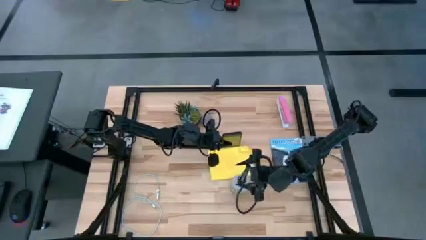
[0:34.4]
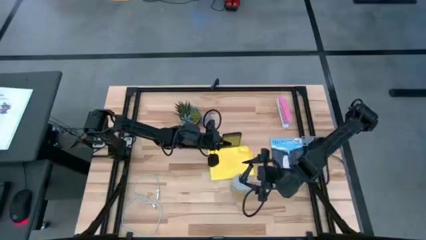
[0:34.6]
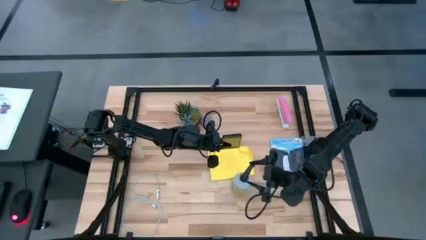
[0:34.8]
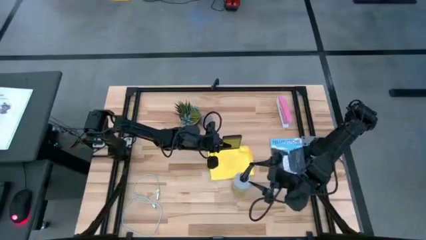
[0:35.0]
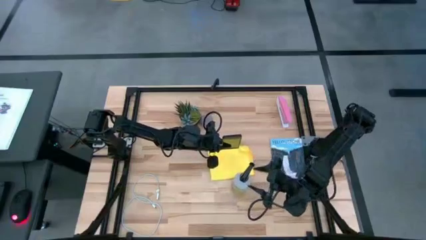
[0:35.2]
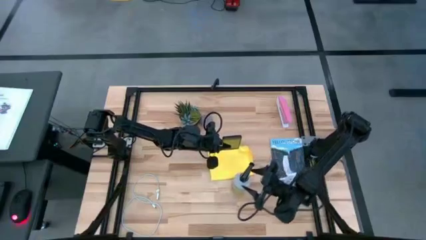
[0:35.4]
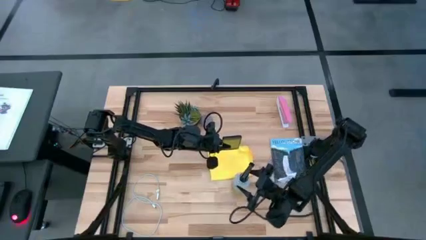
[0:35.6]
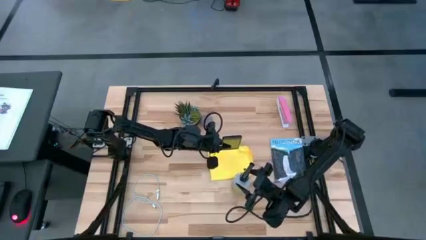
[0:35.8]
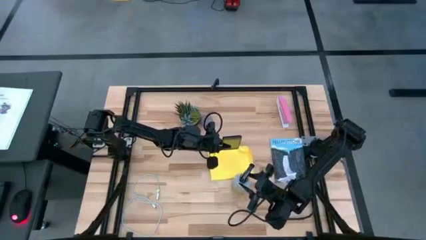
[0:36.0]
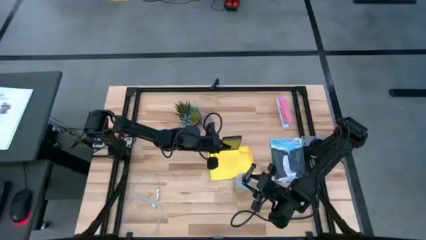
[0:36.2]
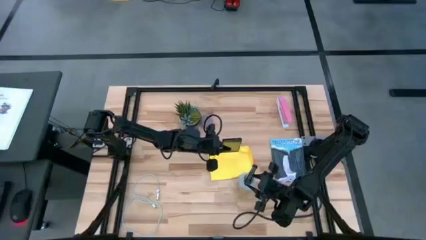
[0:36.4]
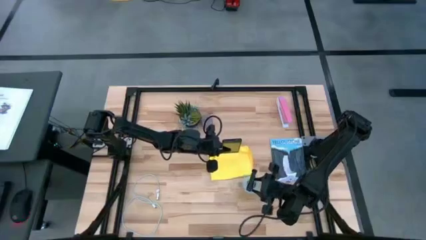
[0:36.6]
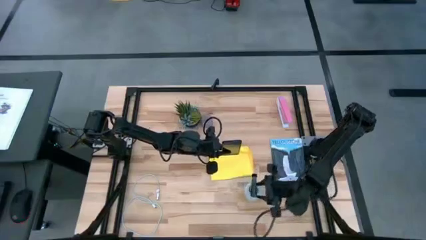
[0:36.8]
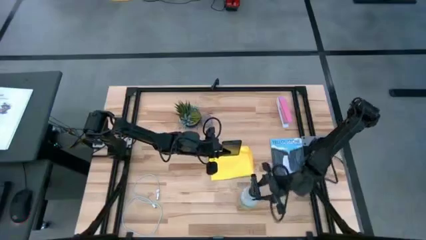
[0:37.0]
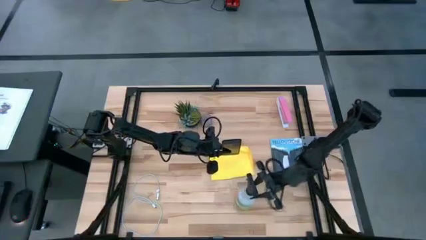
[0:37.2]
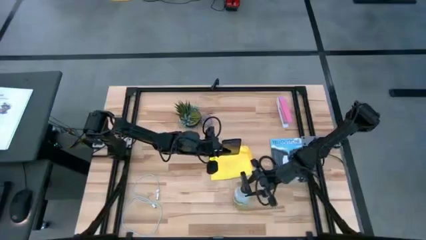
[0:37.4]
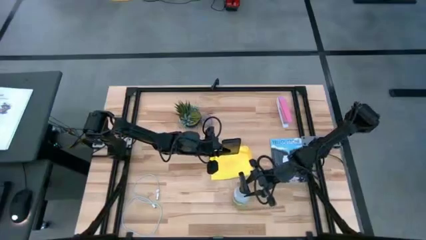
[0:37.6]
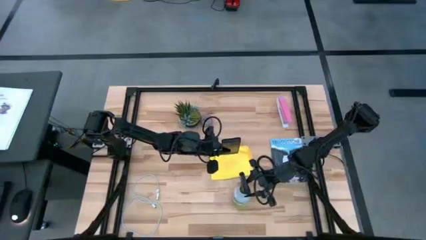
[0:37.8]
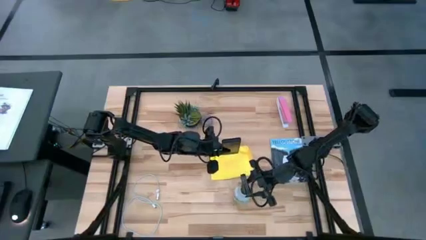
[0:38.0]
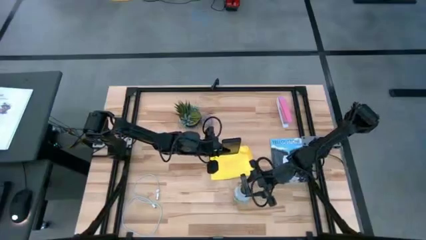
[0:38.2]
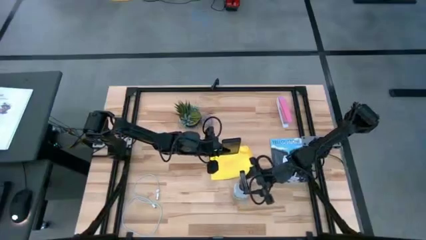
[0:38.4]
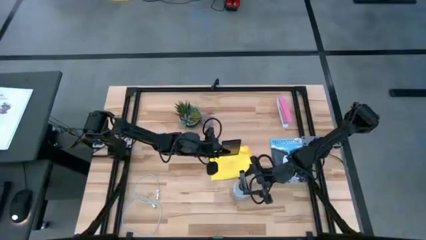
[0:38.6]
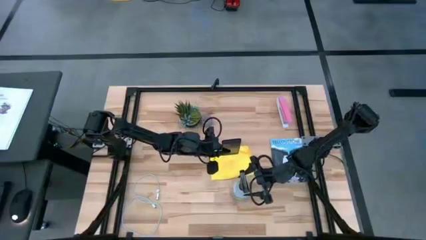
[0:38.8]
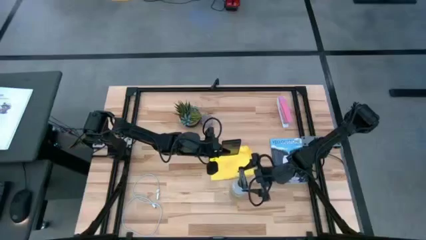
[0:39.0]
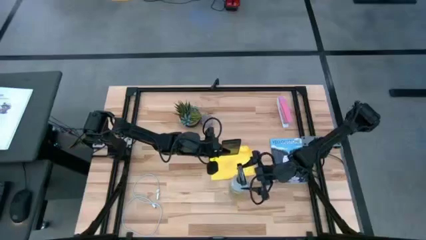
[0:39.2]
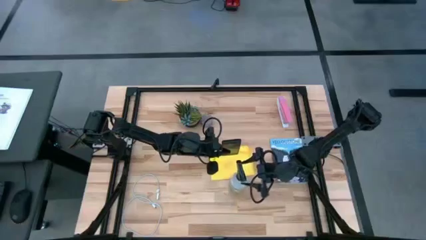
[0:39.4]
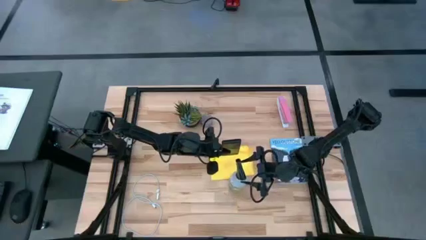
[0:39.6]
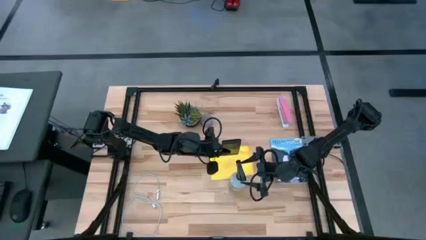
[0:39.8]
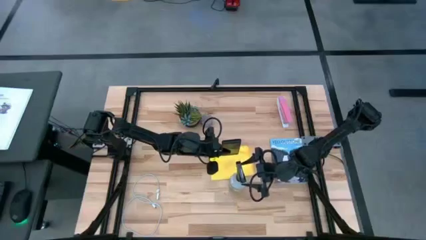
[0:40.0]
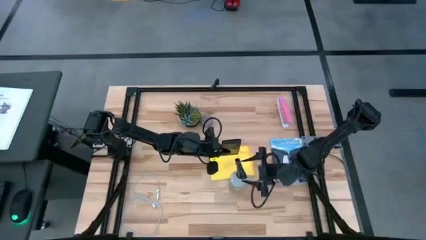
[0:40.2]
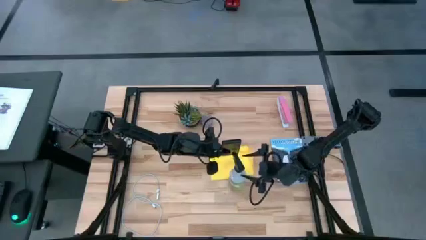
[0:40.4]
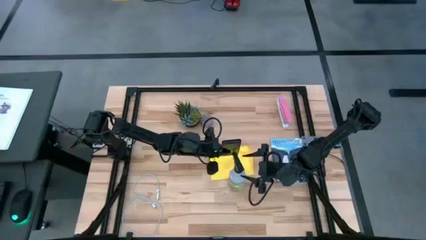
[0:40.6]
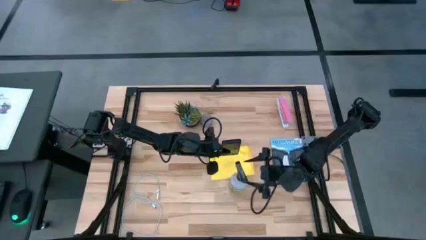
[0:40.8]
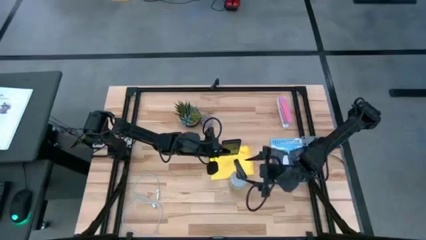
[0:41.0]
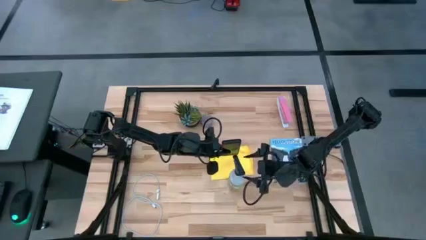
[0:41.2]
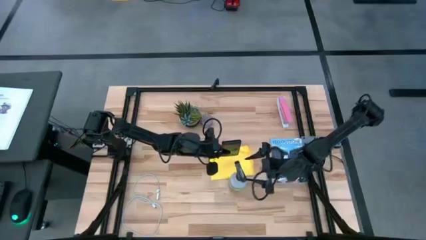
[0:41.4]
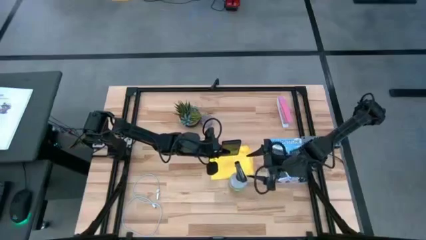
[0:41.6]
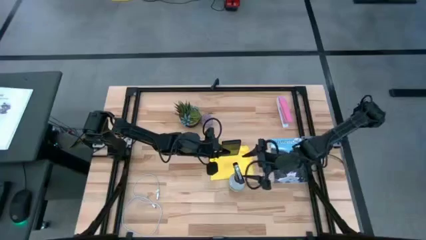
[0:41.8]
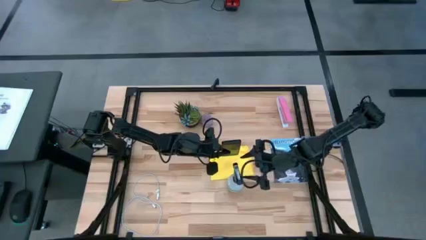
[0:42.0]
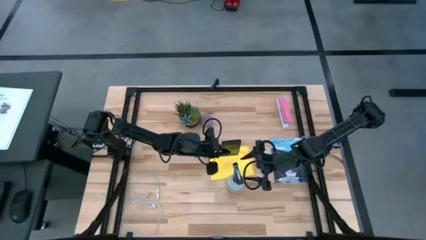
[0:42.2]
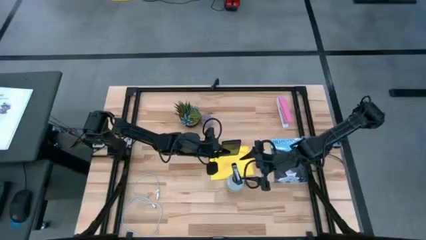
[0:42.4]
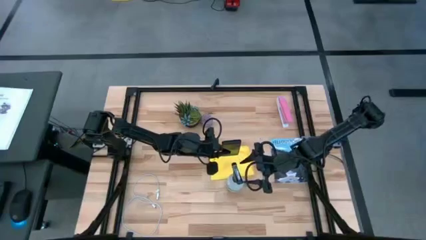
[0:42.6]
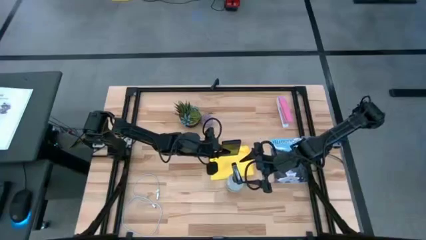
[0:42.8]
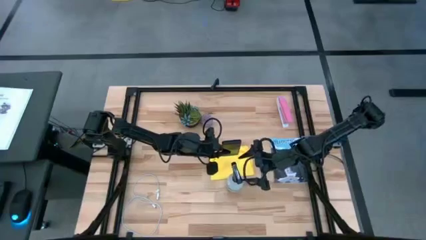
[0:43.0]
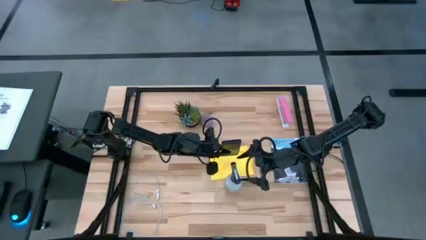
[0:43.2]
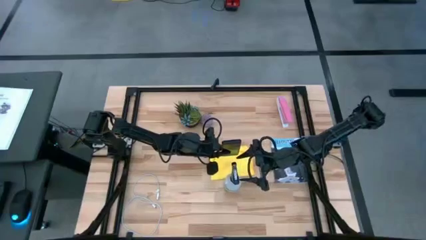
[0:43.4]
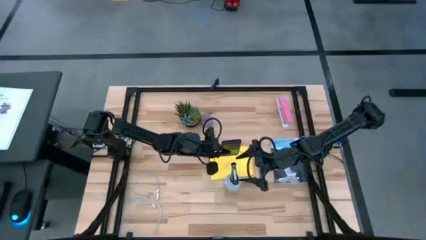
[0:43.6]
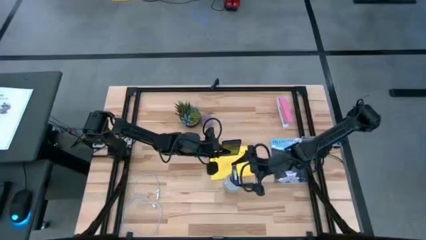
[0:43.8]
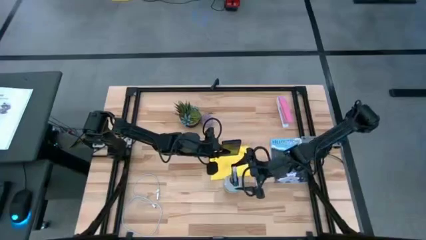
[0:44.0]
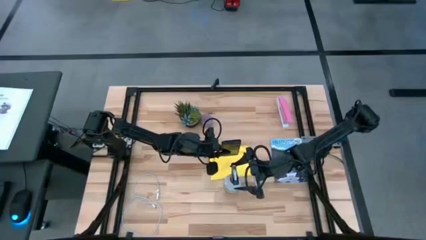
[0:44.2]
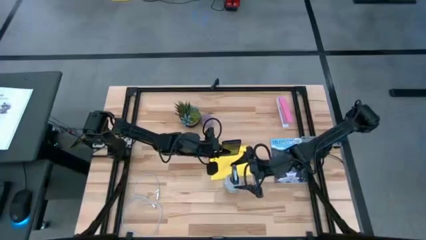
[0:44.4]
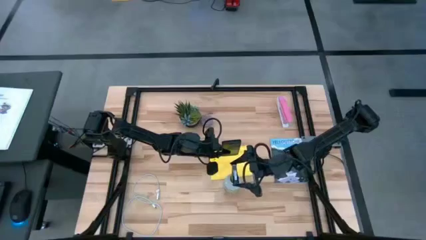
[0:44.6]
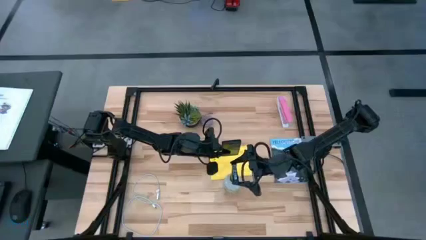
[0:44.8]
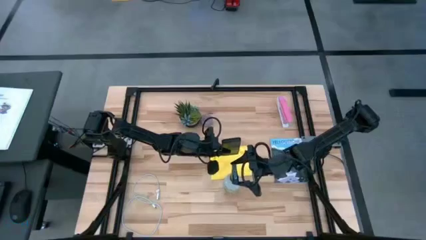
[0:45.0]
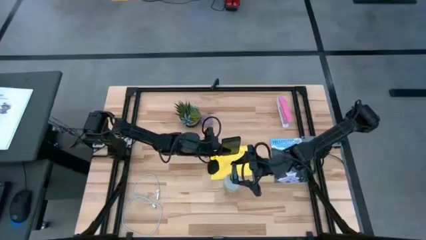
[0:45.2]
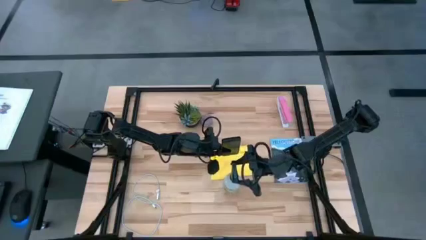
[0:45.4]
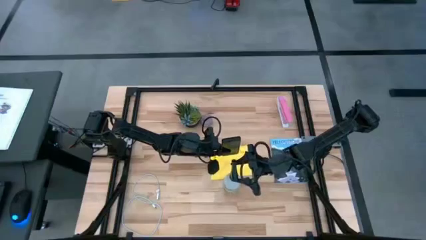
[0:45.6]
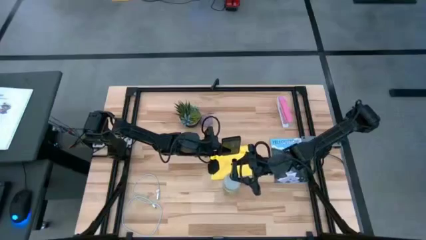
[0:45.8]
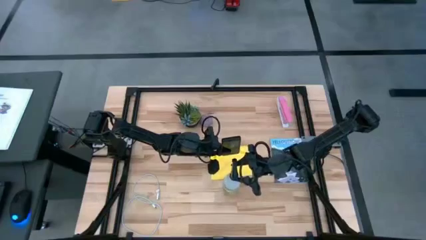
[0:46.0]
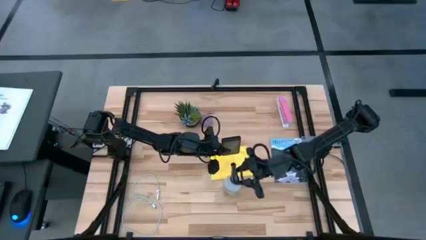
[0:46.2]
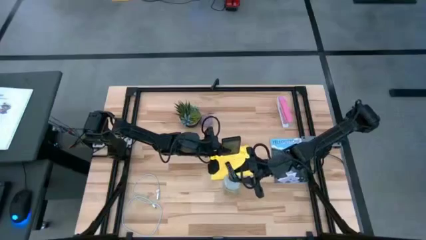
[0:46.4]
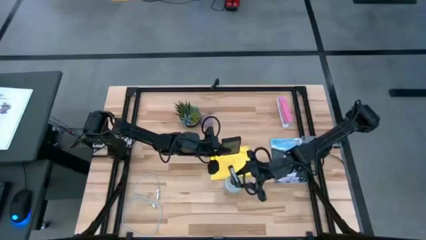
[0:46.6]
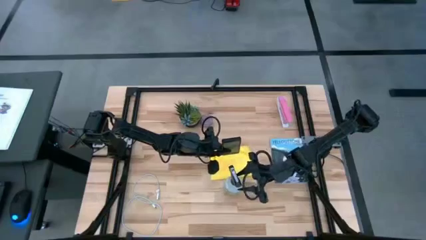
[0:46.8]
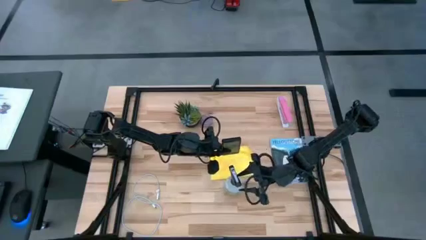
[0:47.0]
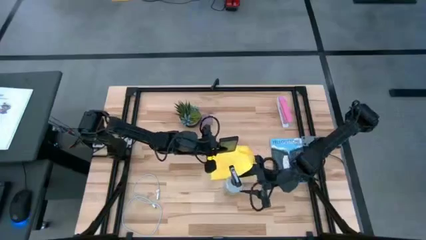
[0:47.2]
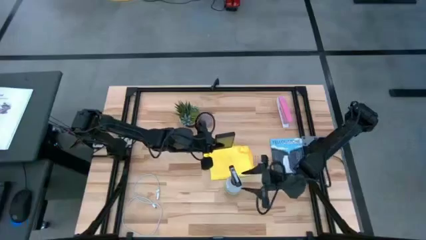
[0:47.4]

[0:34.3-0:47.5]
Task: Apply microfiber cloth
Spray the front side of the cellphone using a spray bottle

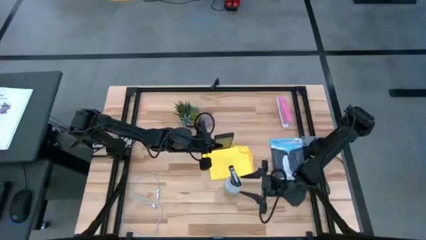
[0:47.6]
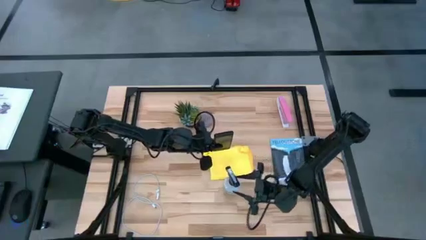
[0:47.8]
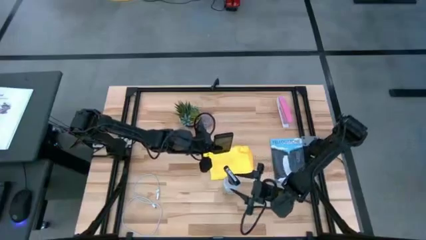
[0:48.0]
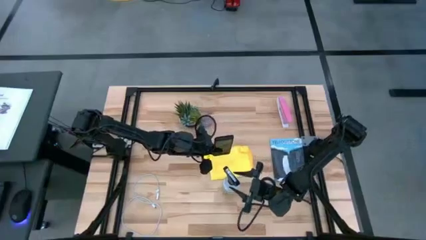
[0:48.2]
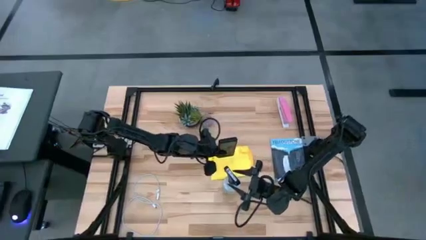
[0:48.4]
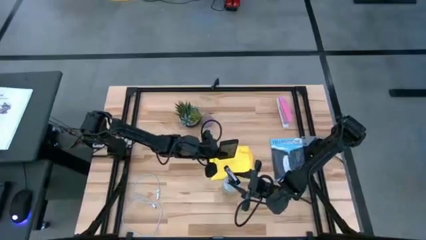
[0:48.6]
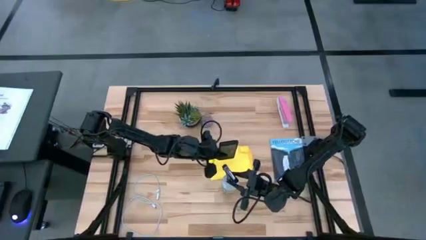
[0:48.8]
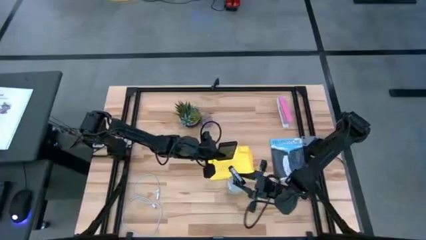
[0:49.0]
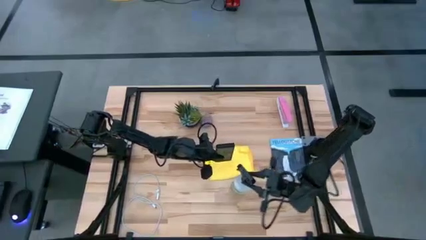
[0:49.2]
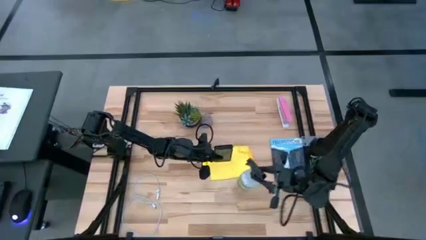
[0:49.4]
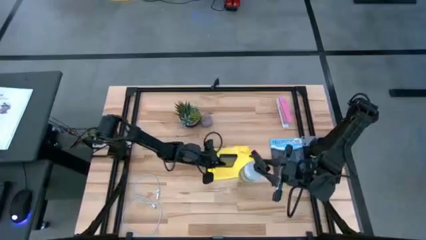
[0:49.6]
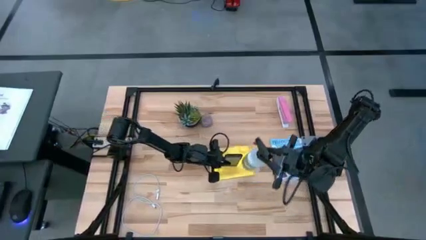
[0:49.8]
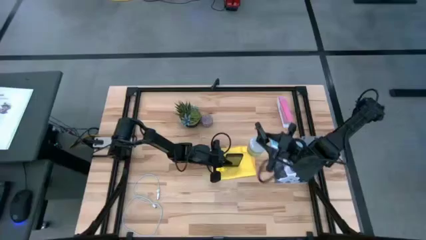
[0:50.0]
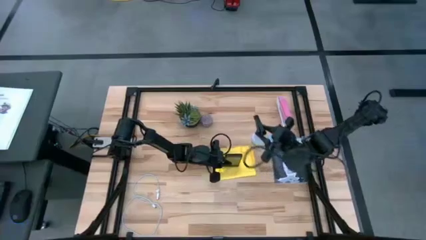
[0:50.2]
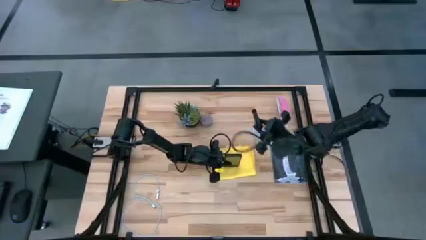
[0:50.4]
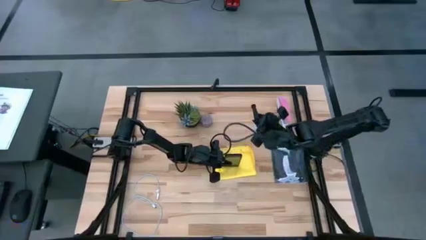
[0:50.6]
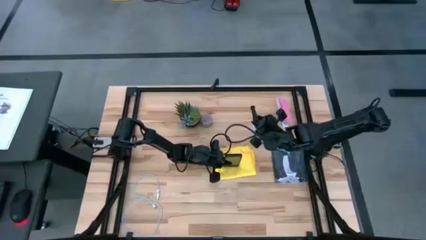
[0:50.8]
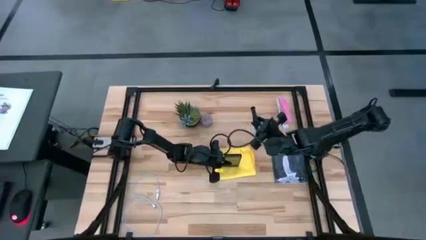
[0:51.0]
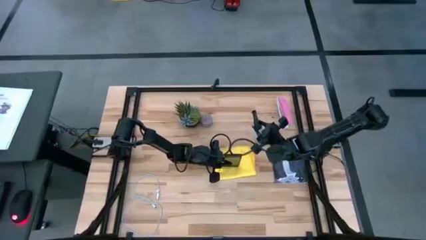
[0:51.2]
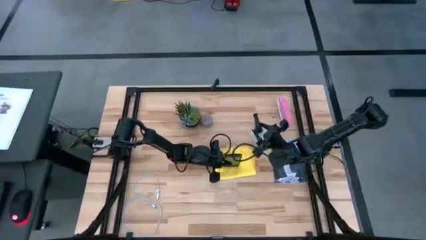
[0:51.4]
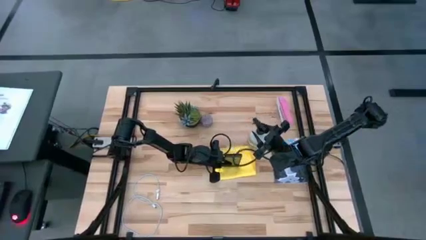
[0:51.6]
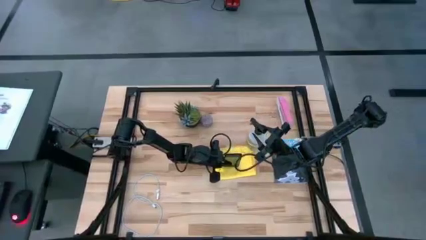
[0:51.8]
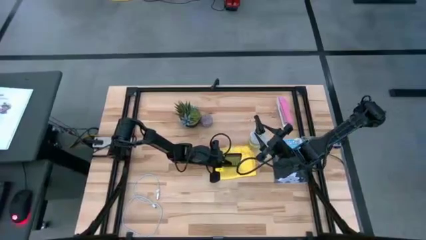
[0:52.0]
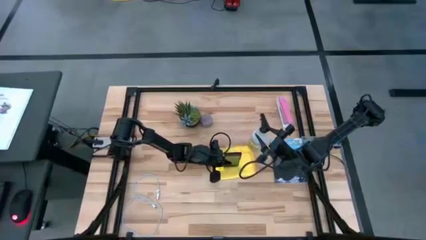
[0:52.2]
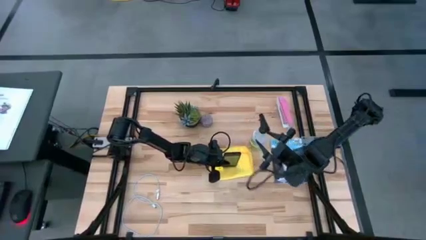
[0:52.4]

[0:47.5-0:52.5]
Move the white spray bottle to the top right of the table
